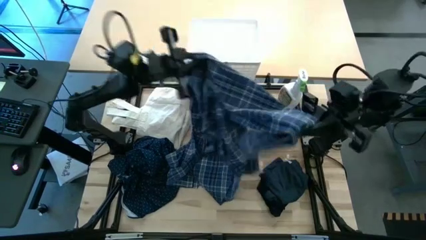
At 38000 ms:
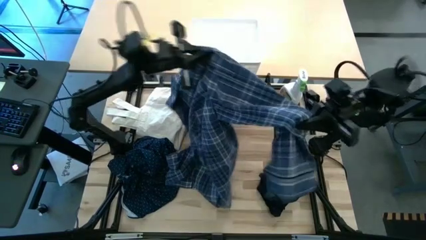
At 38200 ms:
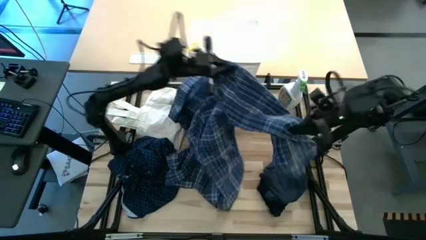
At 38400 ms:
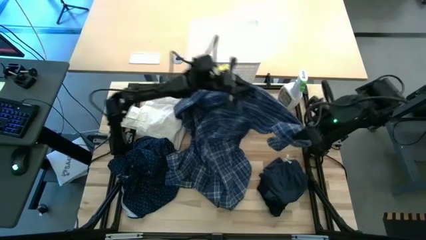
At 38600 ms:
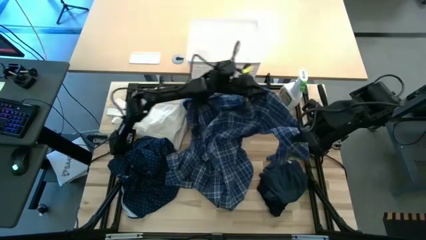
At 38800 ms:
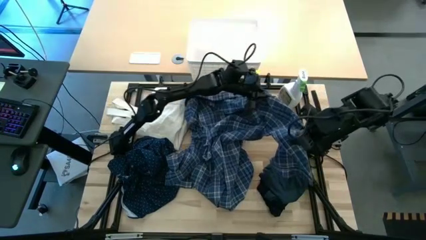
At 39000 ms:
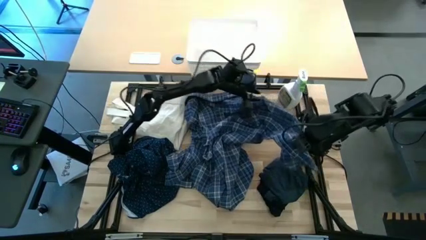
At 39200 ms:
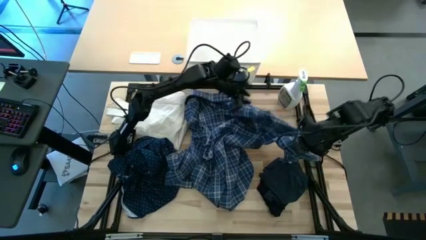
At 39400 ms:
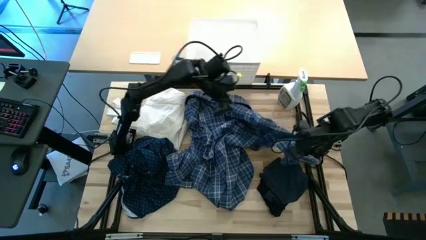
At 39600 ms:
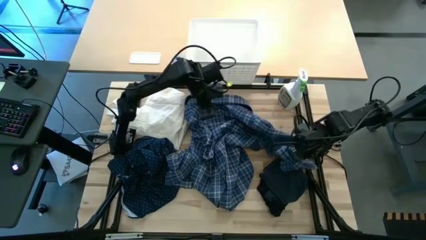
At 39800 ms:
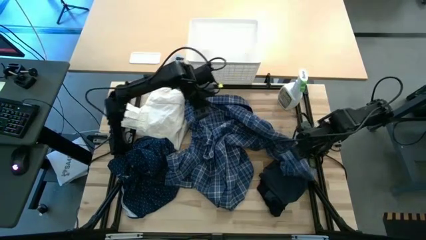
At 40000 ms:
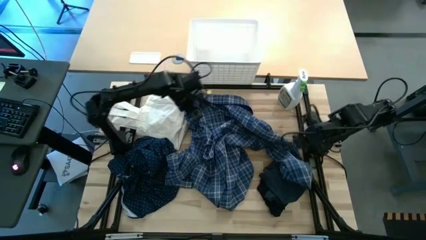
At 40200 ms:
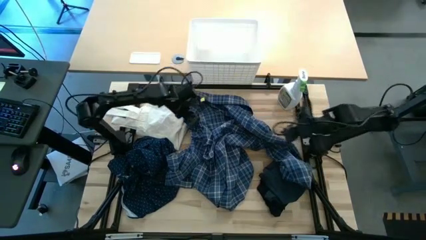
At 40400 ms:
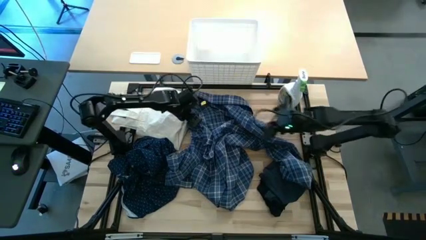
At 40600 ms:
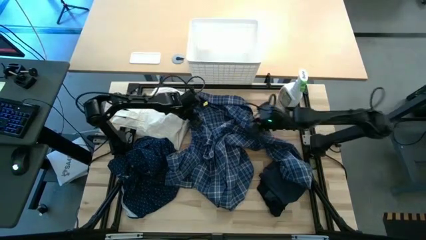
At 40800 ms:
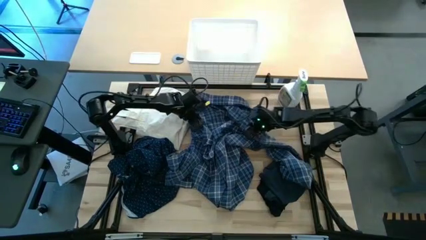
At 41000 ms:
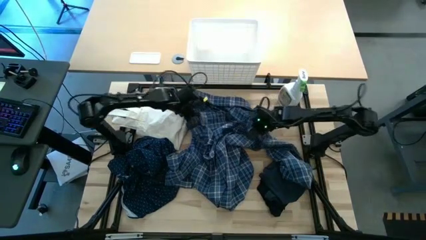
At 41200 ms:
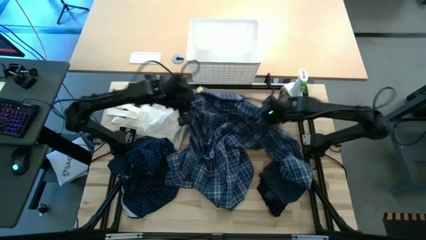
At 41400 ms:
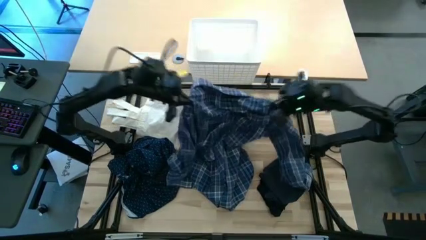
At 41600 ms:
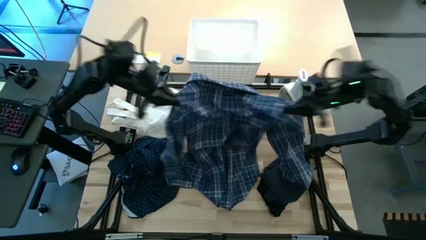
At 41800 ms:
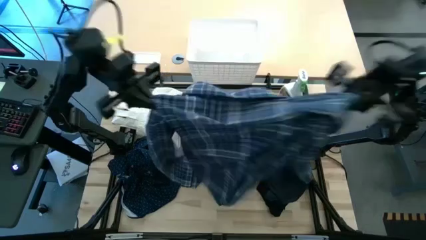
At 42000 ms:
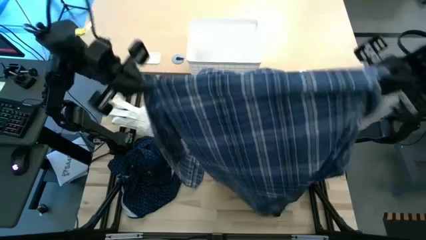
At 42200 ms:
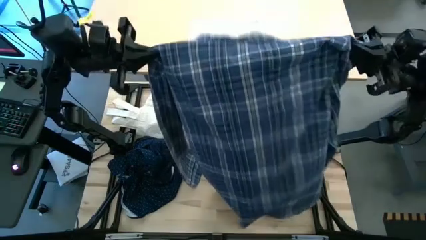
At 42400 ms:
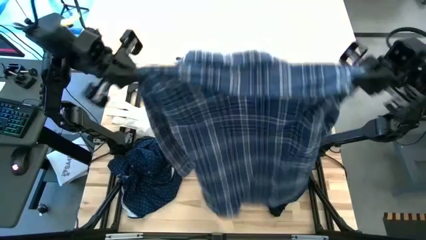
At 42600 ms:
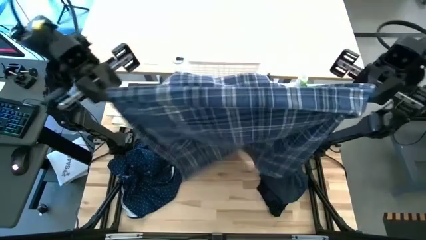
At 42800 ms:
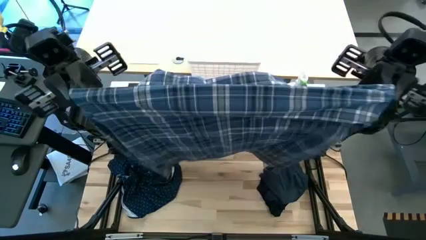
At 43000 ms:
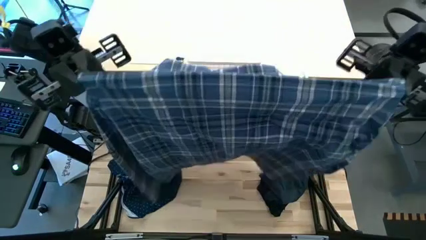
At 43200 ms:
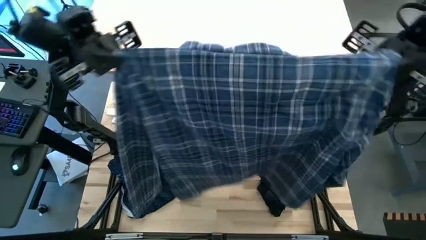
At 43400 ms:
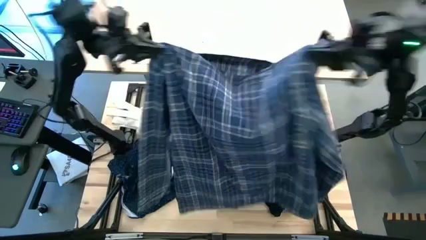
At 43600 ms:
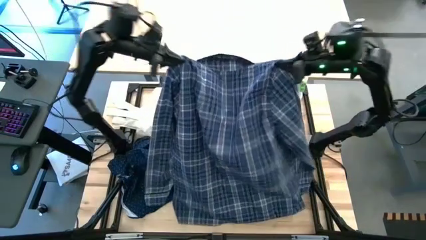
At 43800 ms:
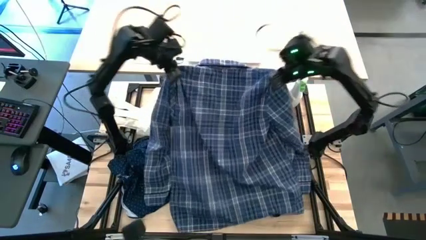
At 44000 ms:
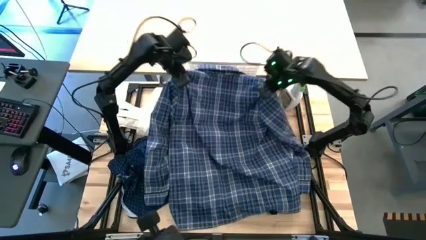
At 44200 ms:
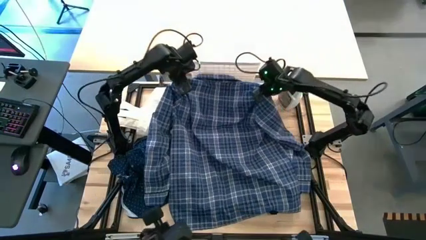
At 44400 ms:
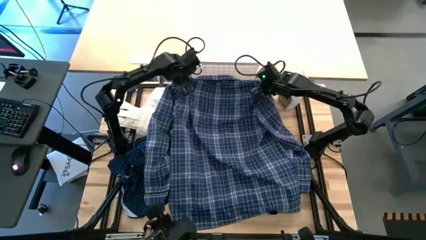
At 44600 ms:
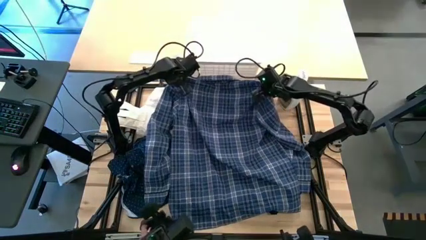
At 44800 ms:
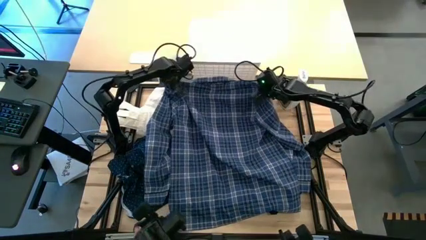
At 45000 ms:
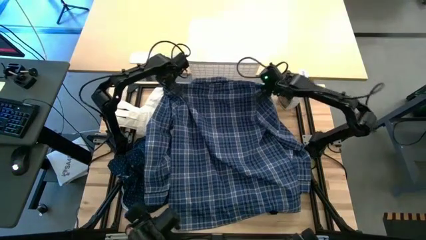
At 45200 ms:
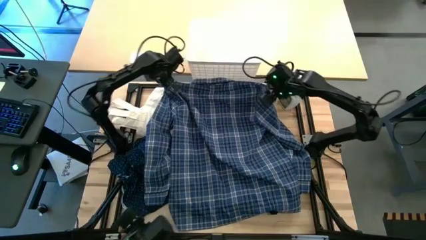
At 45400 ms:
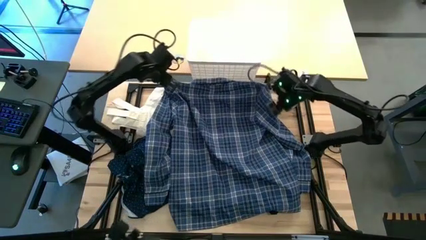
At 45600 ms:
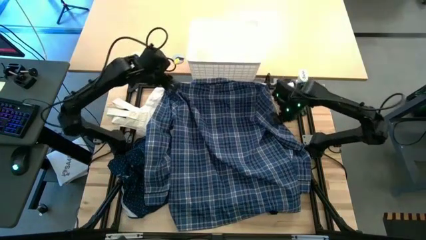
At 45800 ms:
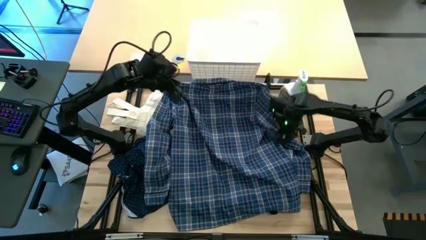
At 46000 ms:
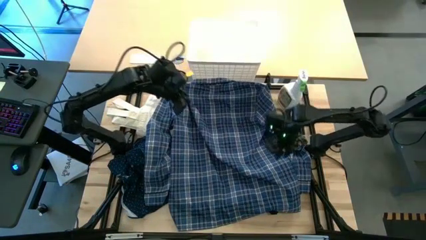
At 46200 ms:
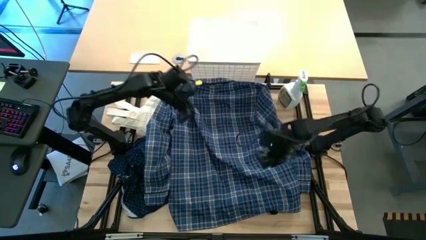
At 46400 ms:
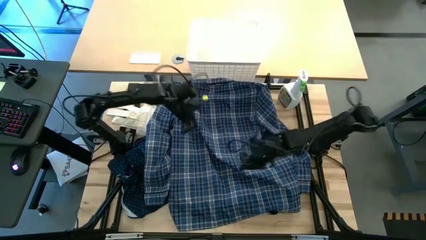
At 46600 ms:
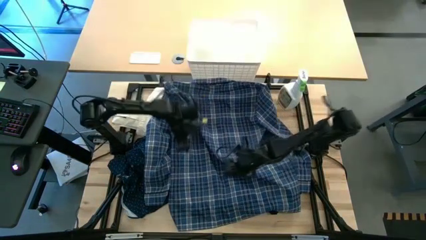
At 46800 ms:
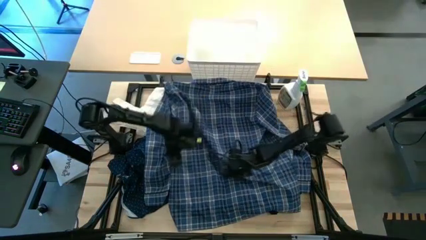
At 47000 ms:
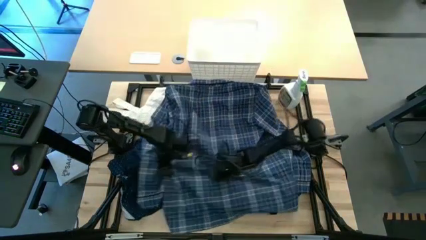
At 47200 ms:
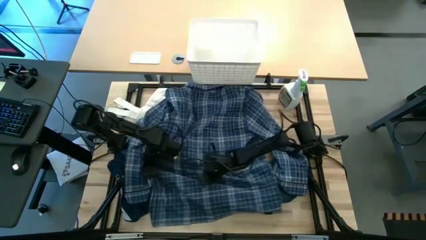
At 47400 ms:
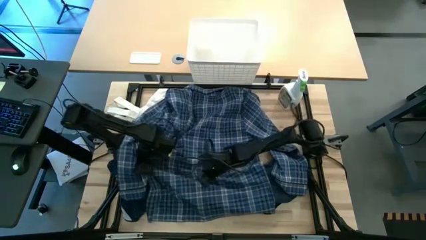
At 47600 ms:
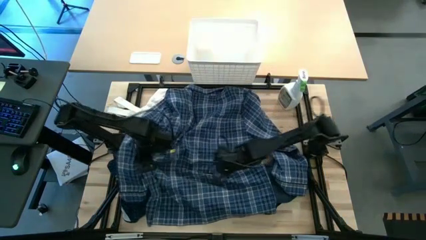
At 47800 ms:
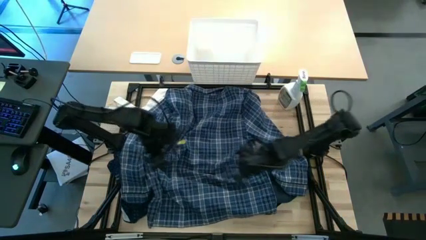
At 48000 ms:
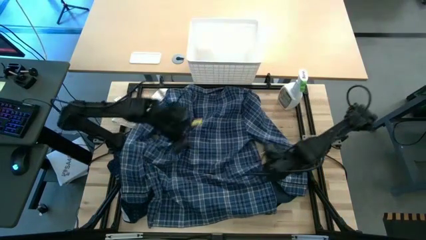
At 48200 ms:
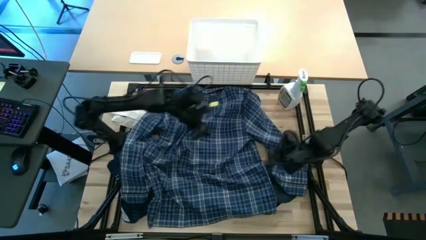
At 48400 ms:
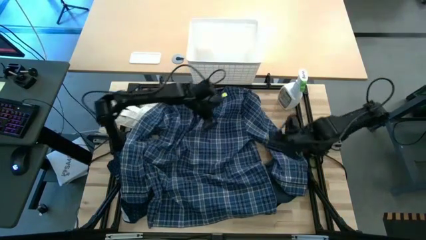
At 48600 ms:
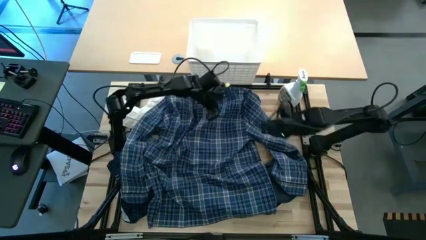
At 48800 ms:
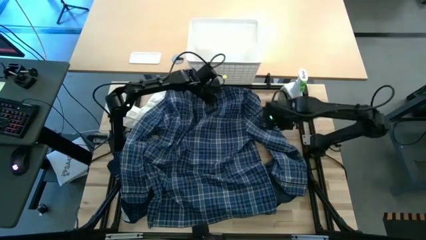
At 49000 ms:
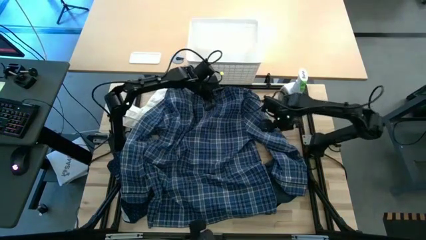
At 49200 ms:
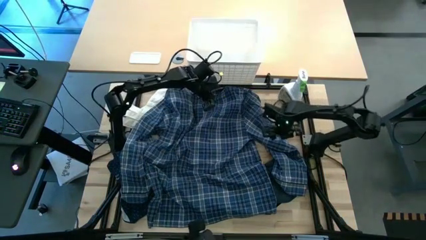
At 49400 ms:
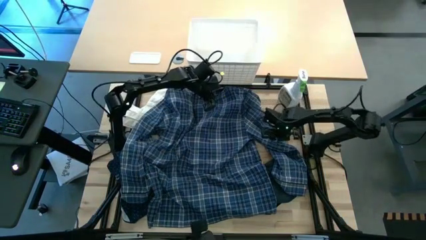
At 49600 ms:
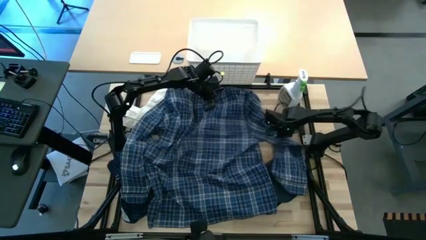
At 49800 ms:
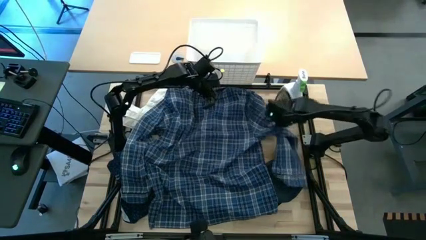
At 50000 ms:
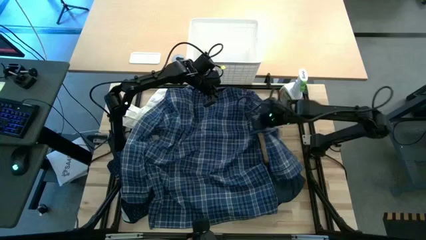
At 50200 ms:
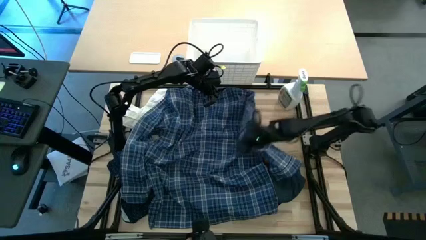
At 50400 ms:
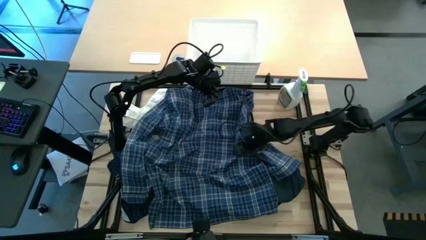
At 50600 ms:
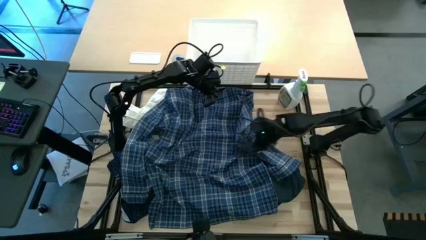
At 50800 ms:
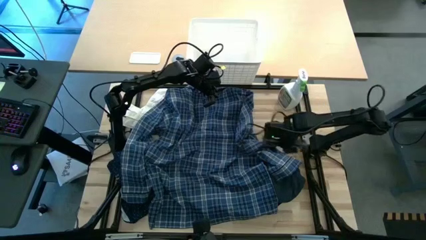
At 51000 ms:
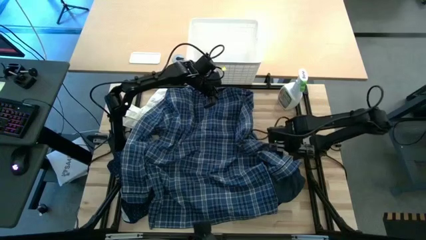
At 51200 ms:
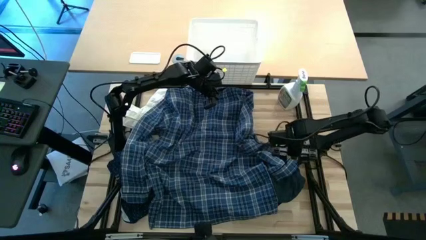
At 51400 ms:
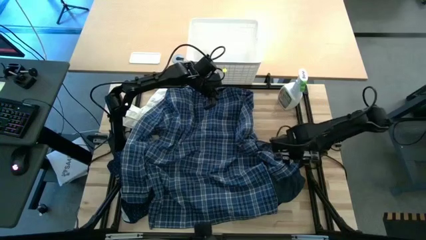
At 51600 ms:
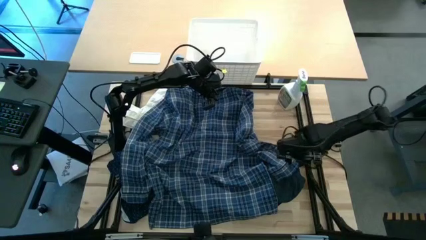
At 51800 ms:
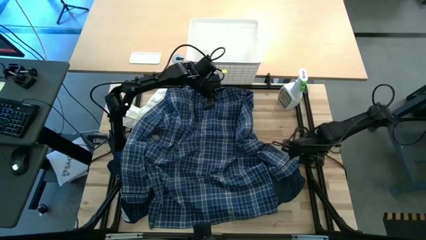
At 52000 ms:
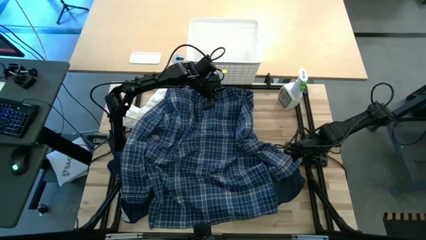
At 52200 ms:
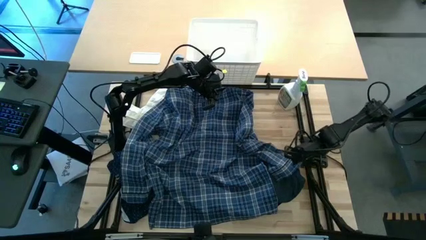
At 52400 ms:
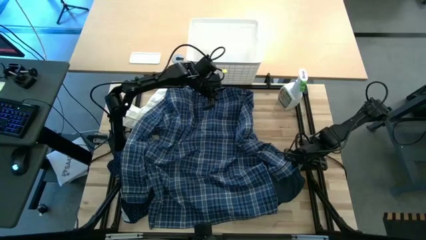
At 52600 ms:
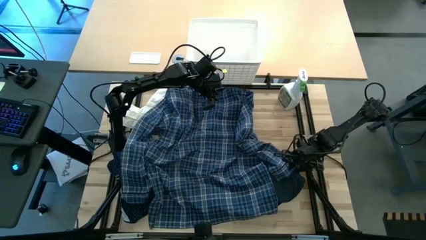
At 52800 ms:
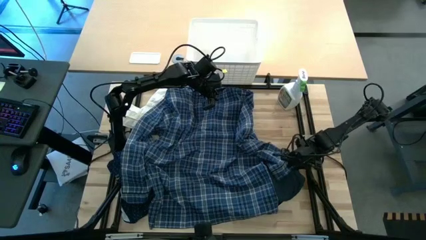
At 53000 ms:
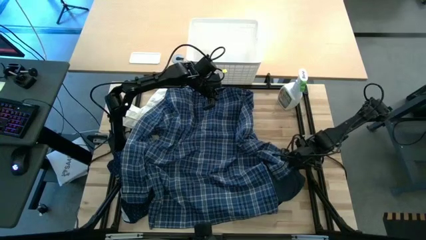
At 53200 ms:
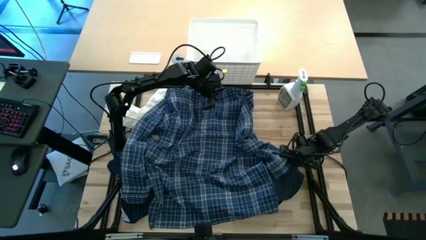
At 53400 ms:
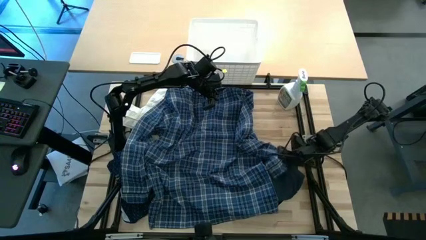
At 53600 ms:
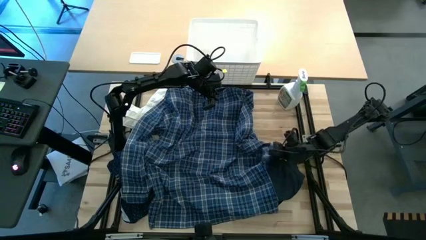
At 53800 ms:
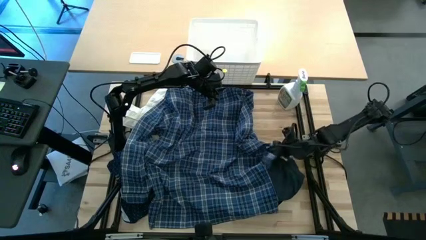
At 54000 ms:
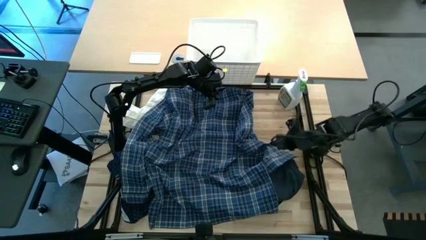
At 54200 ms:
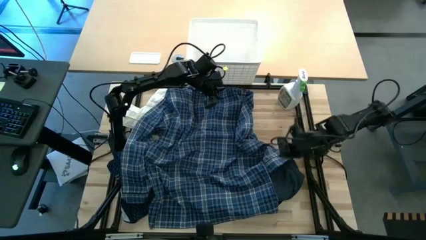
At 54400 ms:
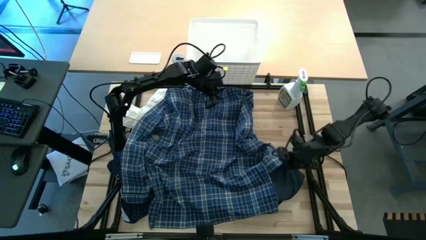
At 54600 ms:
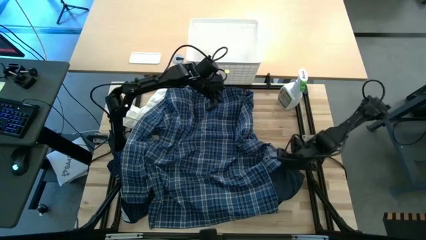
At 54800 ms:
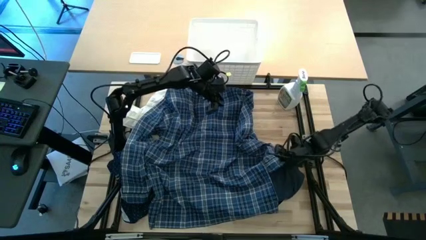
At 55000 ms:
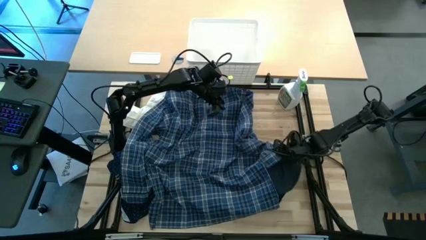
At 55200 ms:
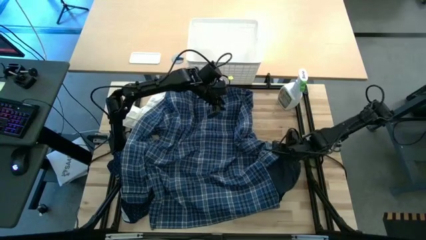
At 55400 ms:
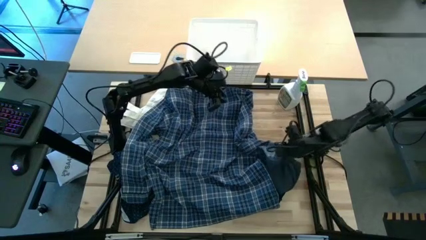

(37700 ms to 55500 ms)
Fold the blue checkered long sleeve
